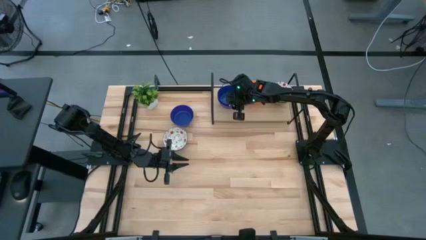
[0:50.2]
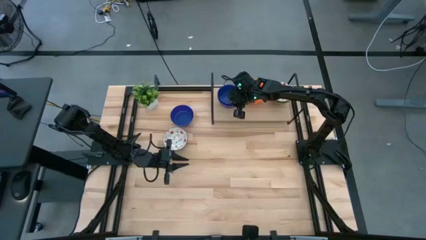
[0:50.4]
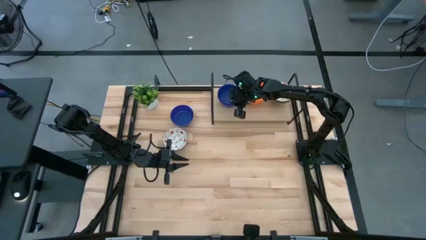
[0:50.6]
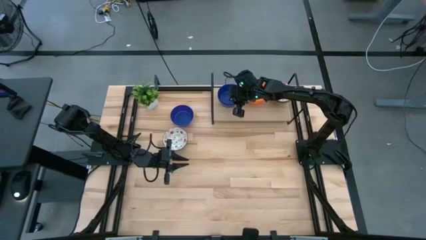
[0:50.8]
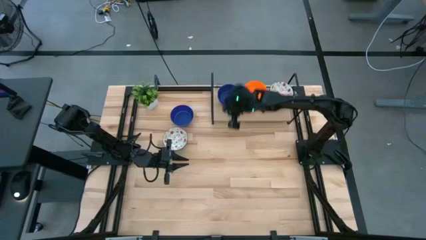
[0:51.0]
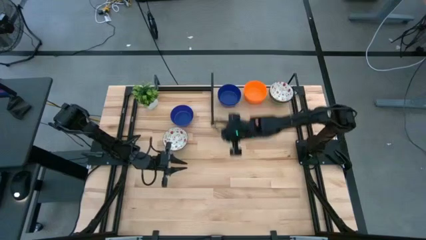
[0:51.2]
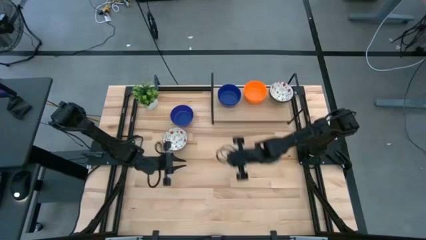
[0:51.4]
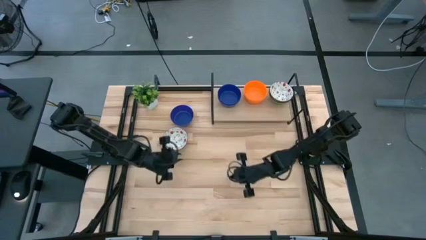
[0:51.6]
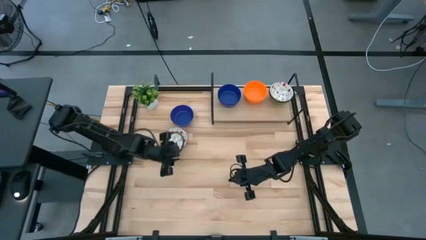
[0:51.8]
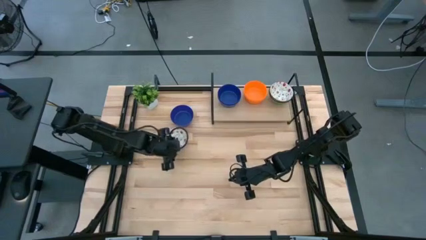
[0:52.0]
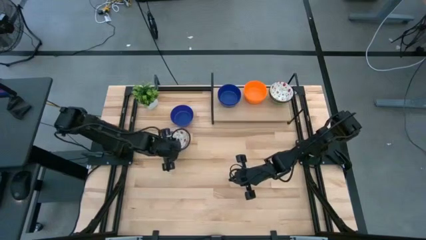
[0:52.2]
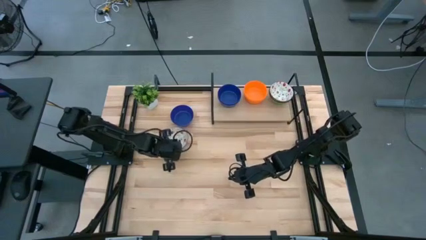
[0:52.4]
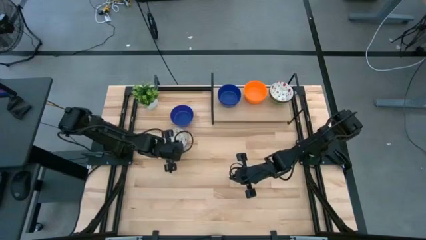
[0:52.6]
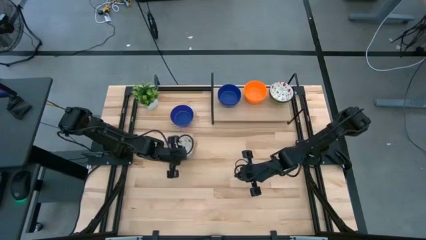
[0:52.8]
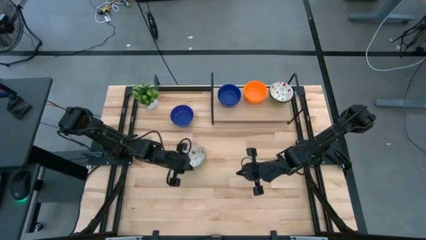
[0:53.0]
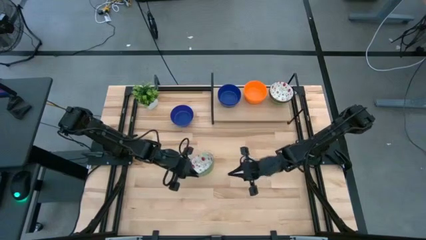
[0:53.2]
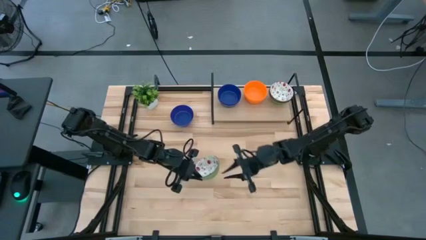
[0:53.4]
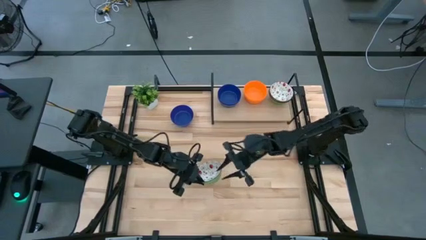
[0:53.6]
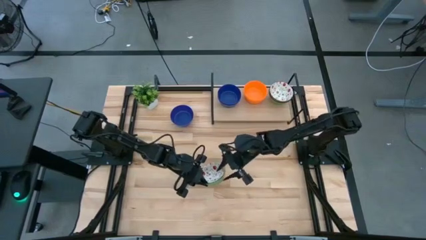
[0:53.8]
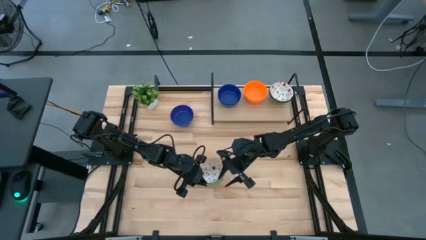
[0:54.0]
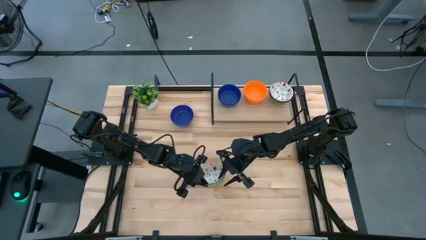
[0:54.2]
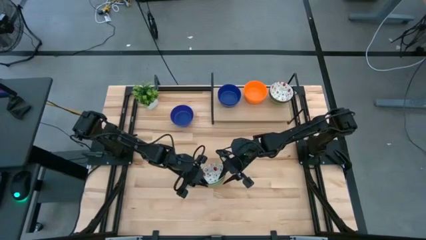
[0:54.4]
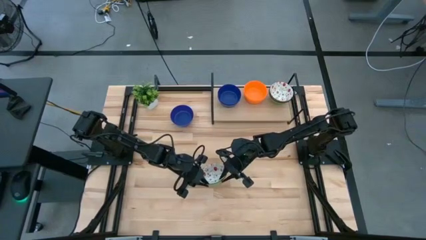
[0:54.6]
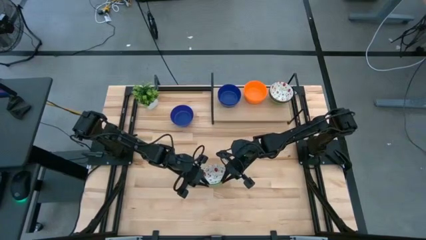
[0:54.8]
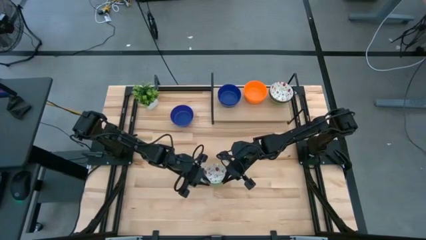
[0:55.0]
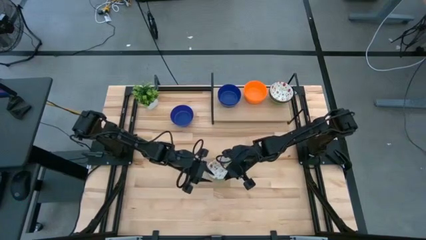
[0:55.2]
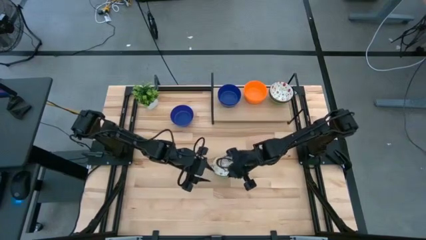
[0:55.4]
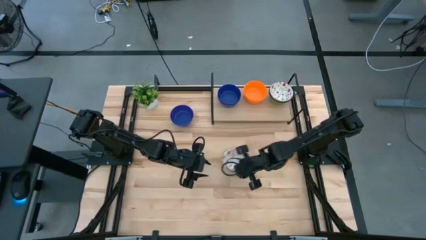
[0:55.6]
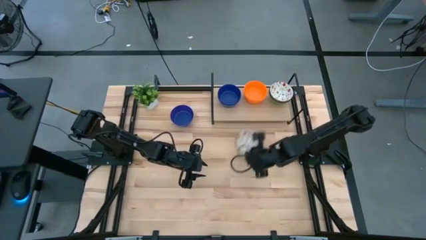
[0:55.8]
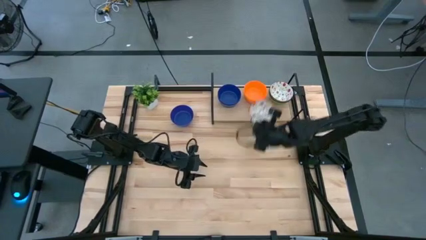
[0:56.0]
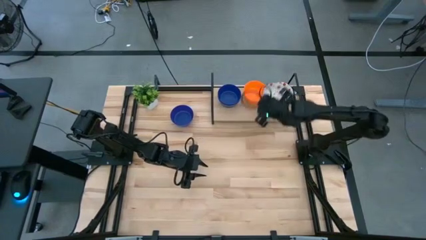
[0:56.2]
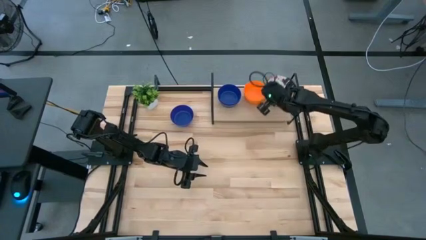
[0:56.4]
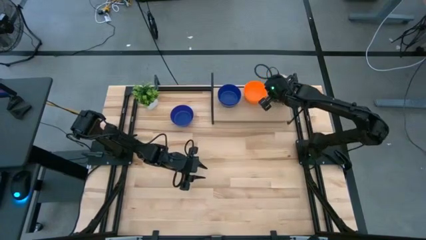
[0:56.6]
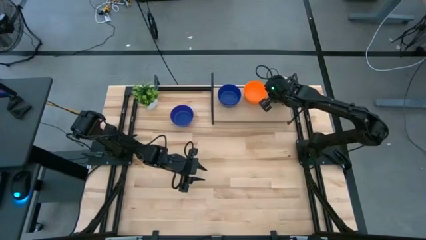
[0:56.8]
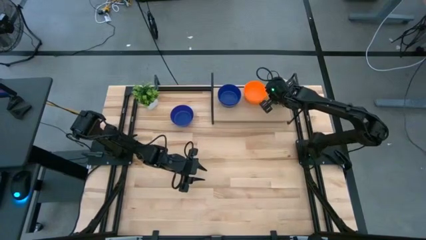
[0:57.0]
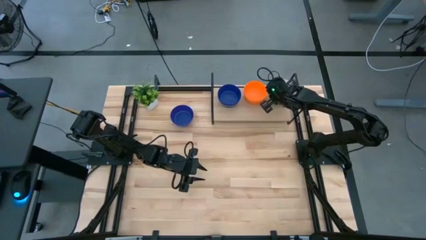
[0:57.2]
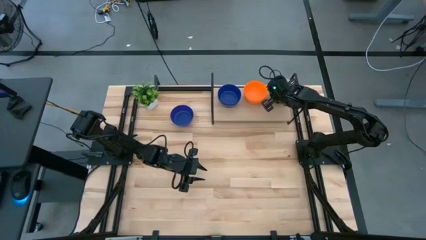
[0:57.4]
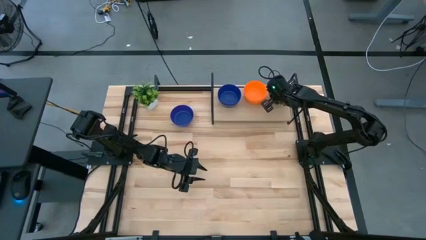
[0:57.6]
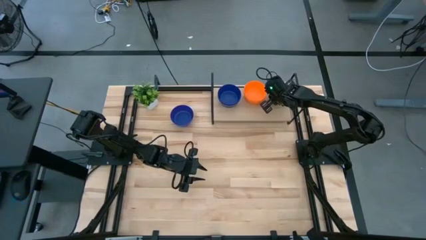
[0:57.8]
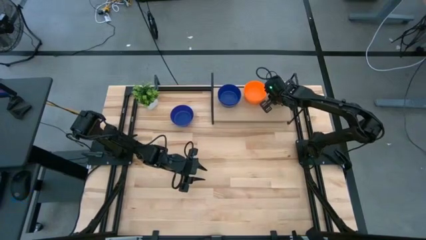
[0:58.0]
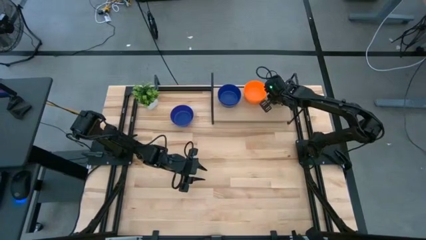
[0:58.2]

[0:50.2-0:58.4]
Task: Pick & Place Mini bowls
Stack the white patterned bowl on top of the white patterned bowl on the shelf

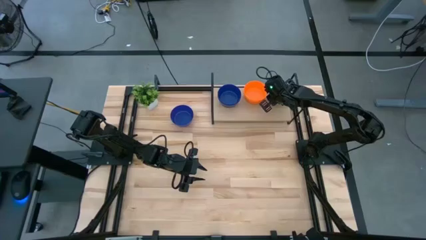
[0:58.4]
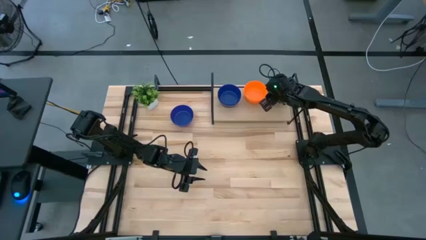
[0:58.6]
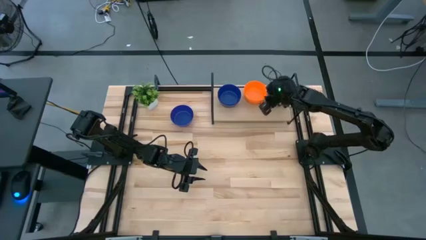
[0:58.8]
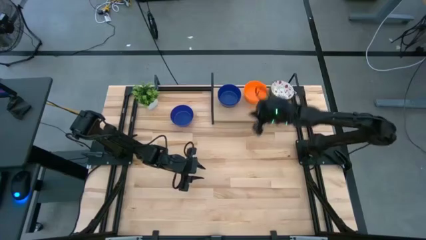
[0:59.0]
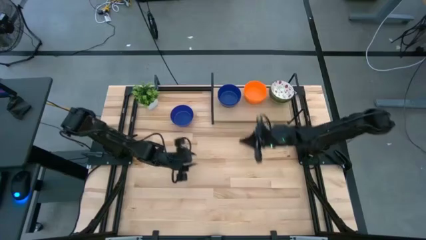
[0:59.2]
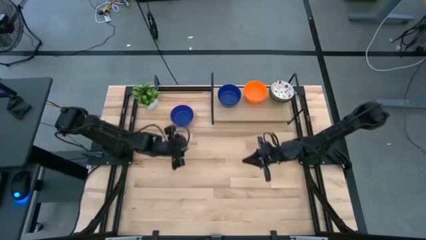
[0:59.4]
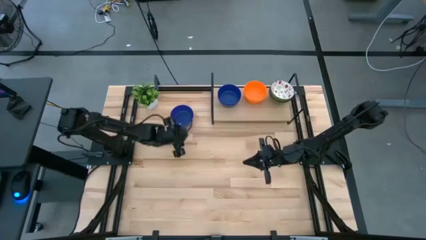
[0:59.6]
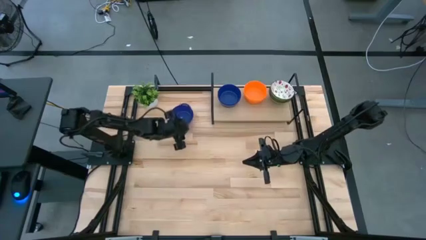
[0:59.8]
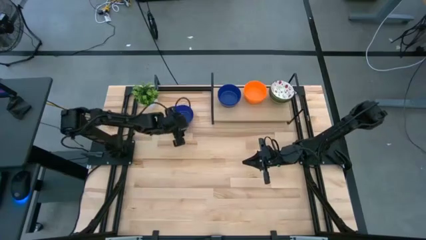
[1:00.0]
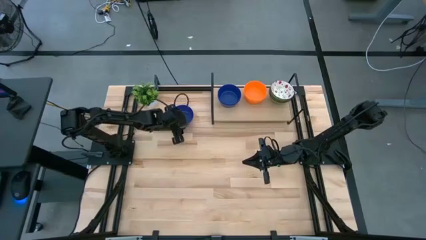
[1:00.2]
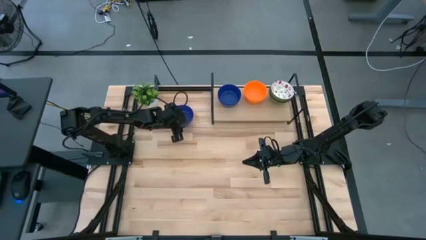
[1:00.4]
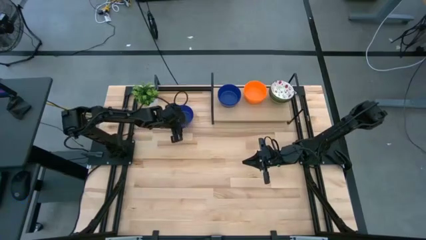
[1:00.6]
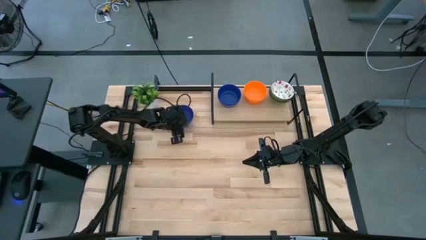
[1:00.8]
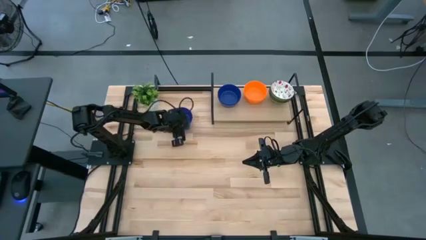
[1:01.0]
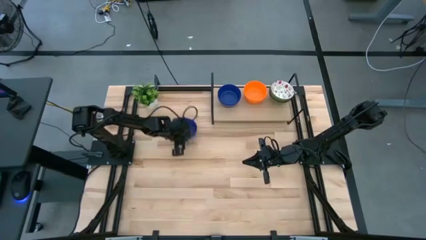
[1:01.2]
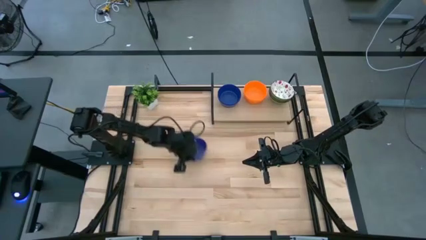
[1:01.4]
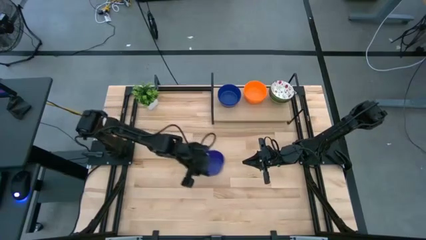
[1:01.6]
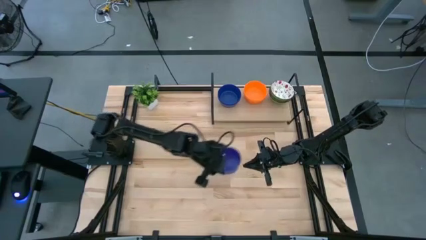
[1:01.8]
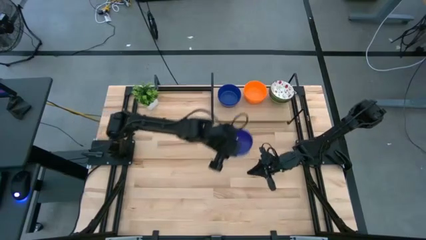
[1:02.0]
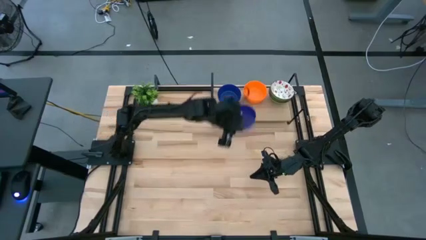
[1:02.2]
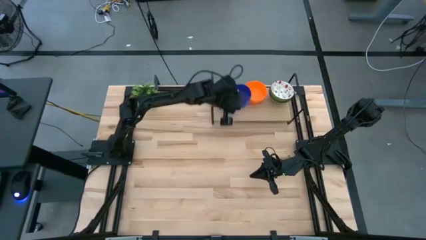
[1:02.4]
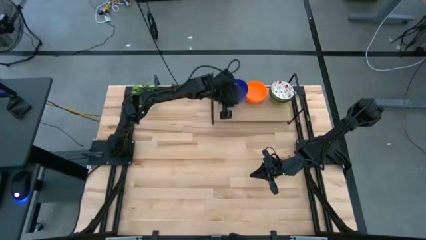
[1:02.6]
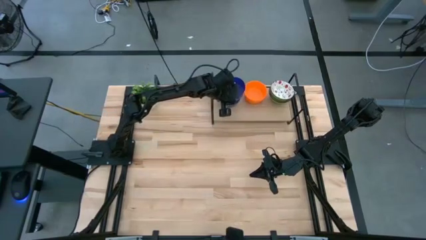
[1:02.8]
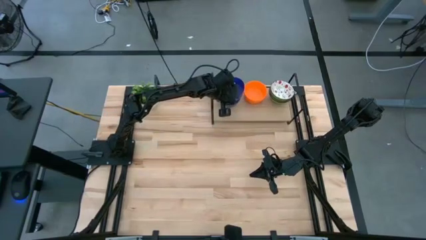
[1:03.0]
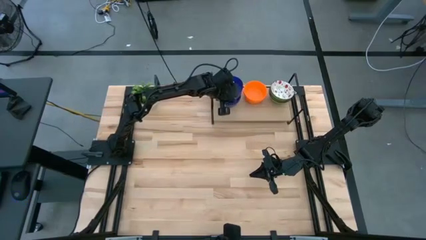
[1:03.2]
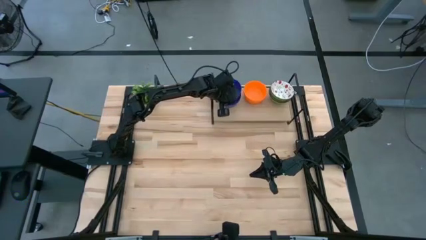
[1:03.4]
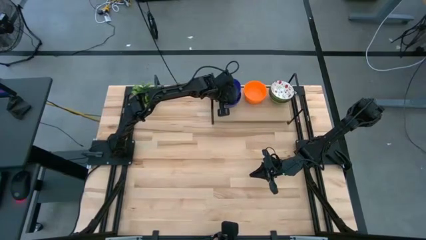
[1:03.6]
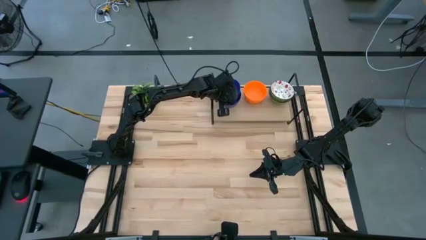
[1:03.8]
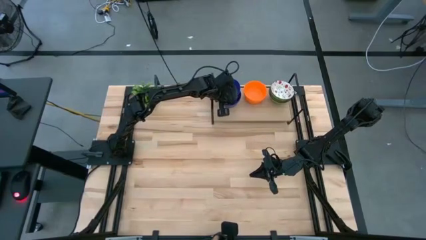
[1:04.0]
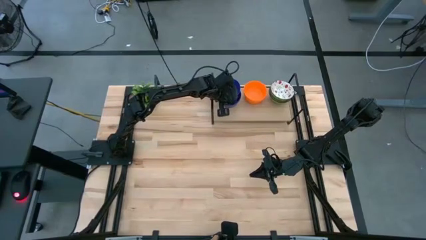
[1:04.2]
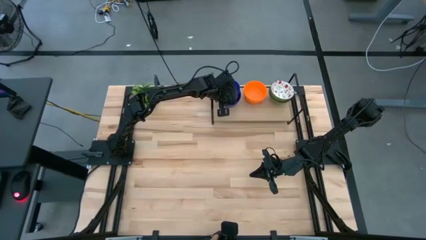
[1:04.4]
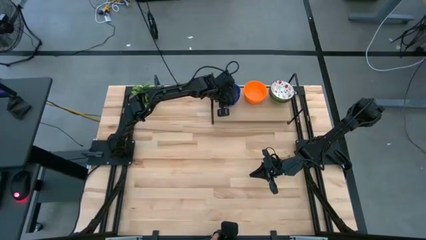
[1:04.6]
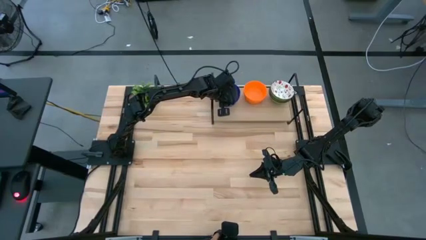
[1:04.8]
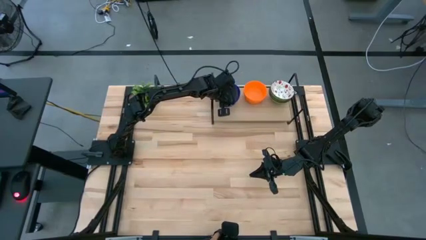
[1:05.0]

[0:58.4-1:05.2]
Stack the blue bowl on top of the blue bowl on the shelf

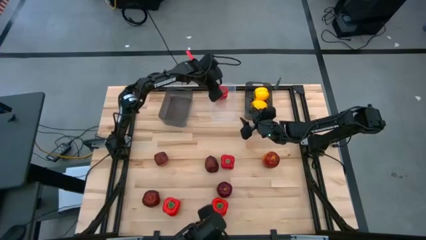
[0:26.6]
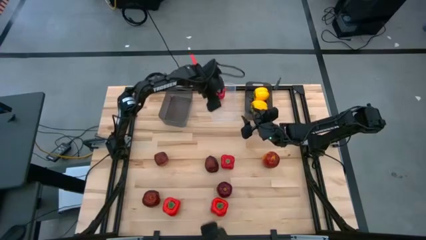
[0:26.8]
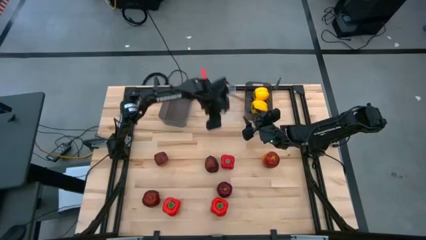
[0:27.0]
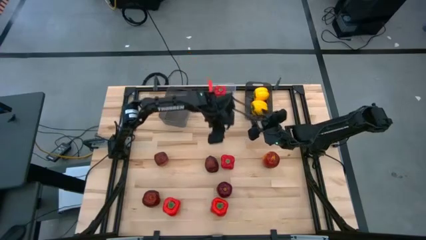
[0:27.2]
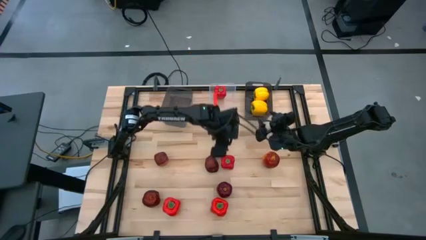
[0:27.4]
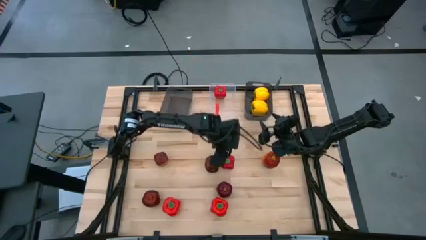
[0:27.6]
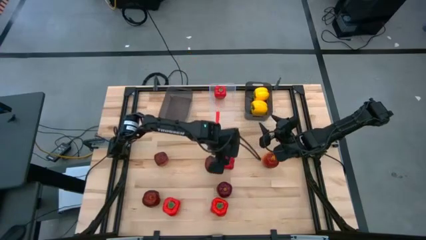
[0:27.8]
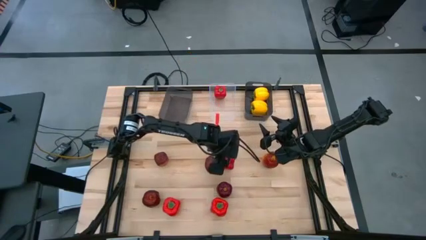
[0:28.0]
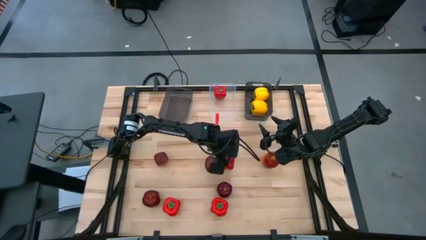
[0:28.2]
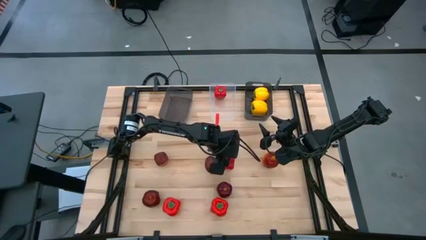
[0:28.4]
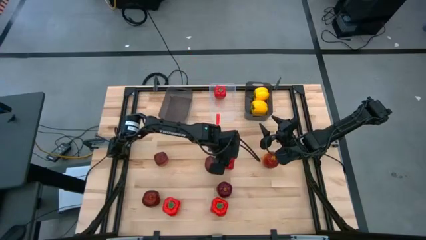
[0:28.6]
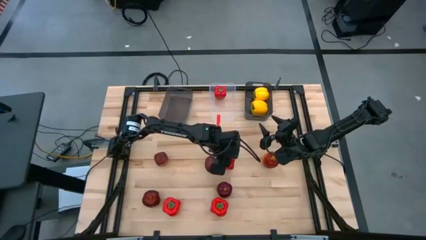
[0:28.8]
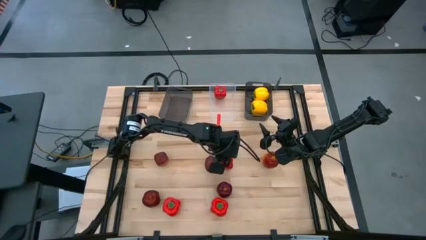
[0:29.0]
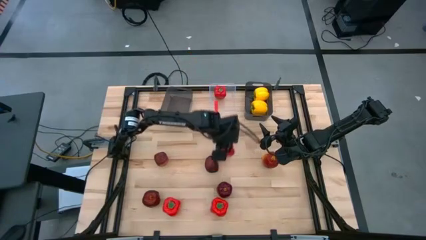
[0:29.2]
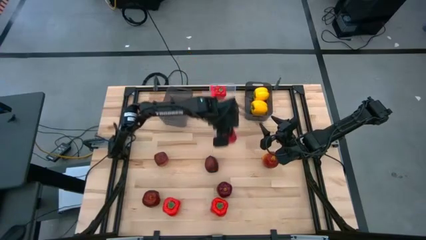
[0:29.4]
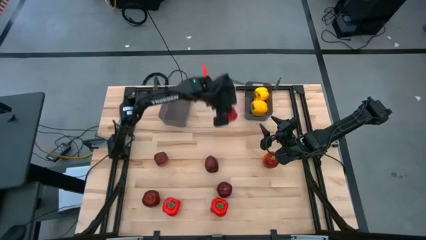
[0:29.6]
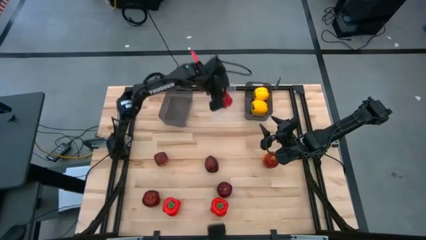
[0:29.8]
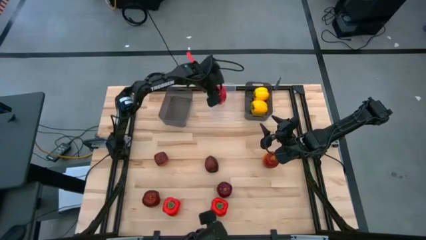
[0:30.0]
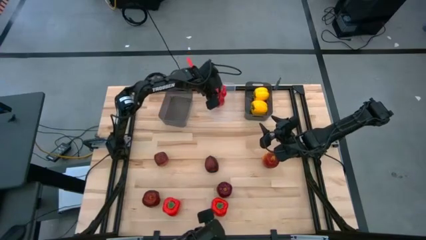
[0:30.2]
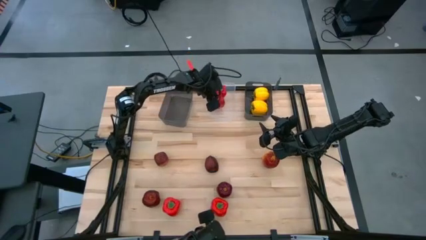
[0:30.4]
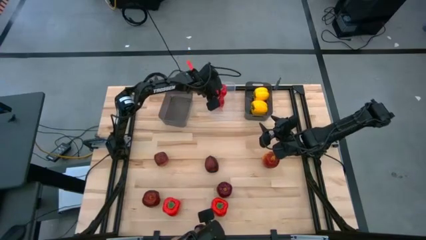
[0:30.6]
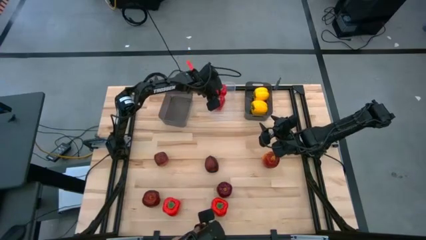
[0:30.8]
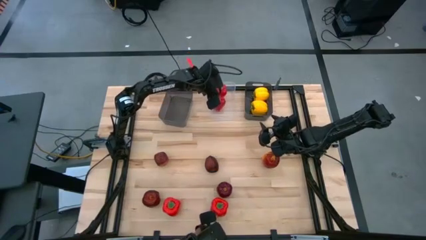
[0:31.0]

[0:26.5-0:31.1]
Task: Sort produce into baskets
Put the top red bell pepper into the transparent bin
